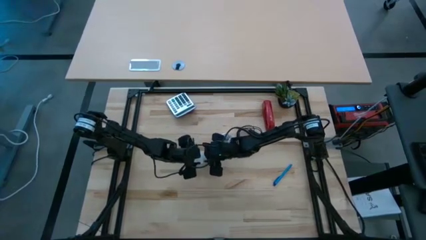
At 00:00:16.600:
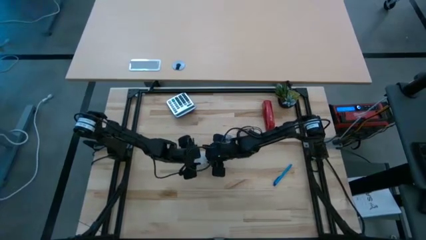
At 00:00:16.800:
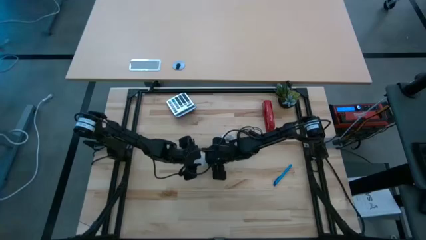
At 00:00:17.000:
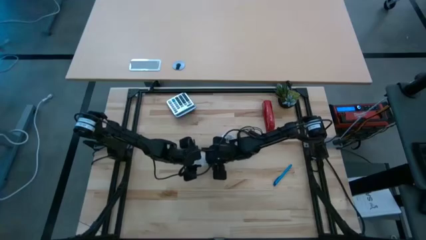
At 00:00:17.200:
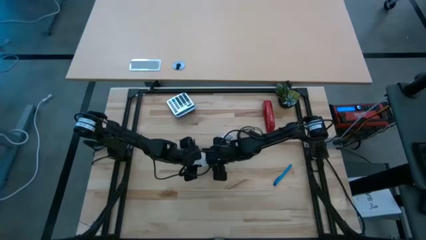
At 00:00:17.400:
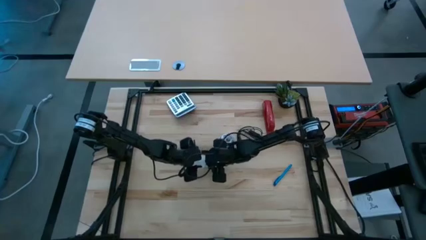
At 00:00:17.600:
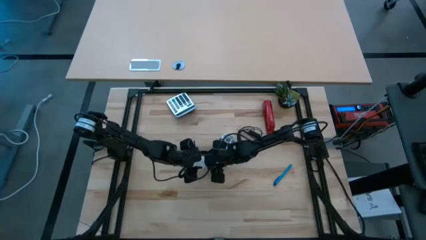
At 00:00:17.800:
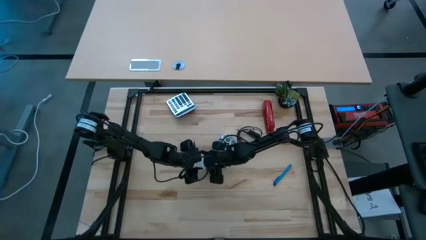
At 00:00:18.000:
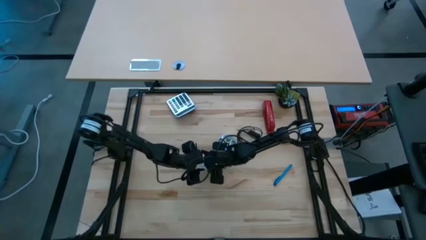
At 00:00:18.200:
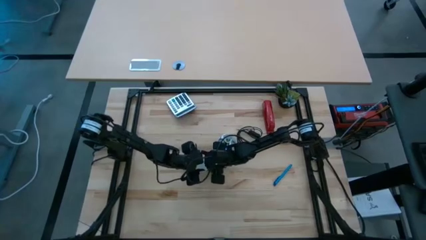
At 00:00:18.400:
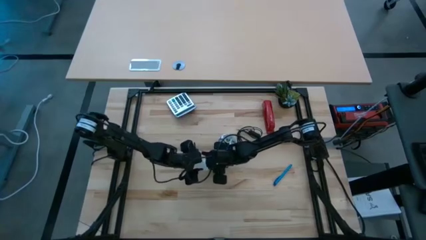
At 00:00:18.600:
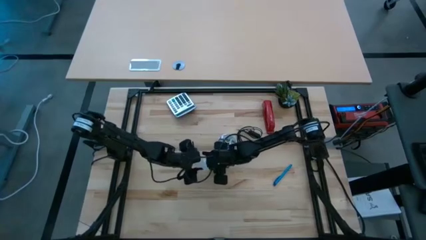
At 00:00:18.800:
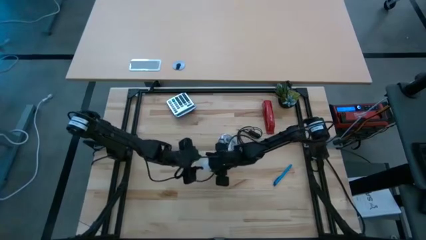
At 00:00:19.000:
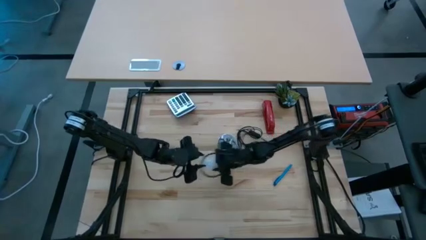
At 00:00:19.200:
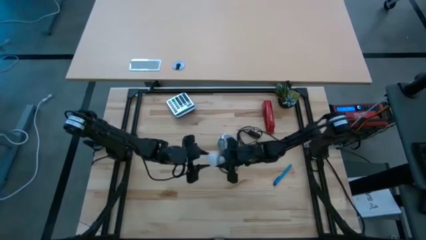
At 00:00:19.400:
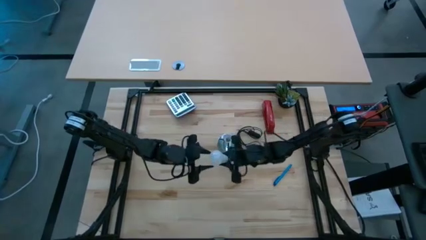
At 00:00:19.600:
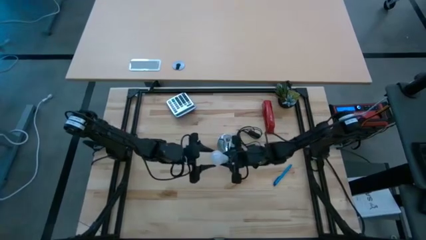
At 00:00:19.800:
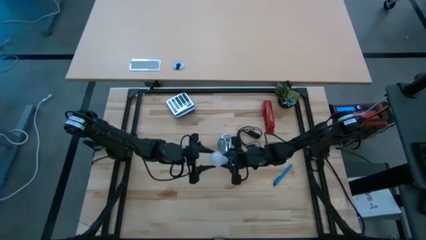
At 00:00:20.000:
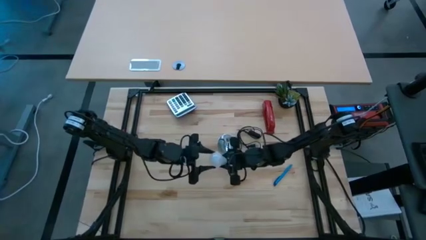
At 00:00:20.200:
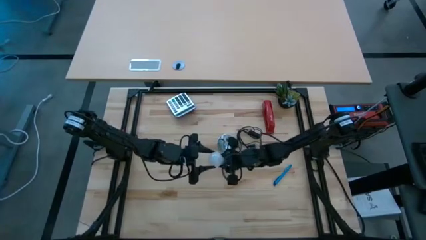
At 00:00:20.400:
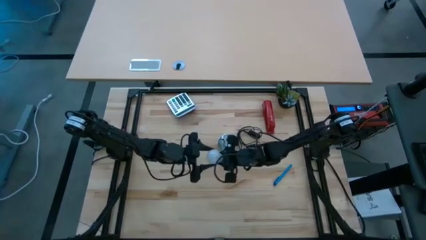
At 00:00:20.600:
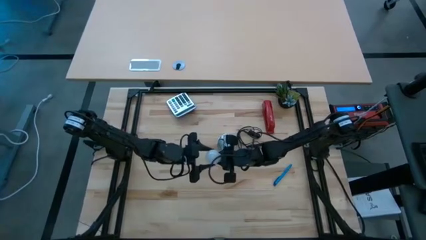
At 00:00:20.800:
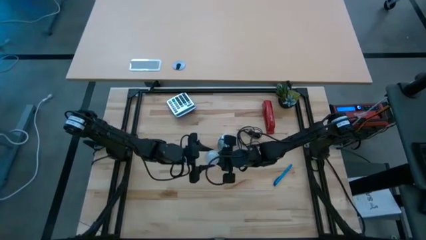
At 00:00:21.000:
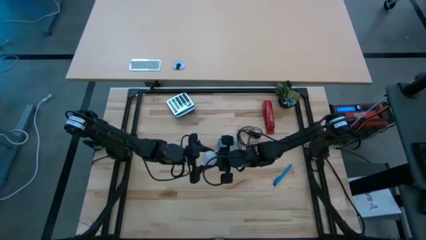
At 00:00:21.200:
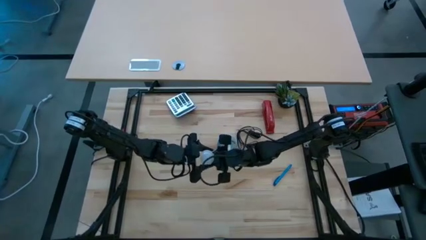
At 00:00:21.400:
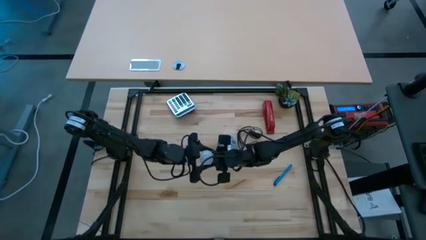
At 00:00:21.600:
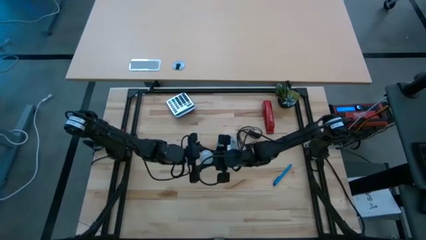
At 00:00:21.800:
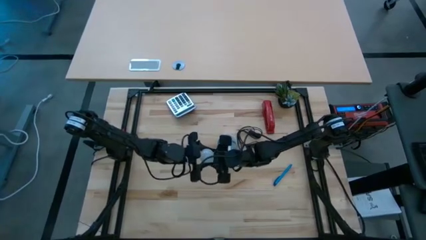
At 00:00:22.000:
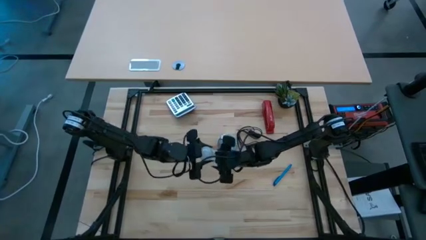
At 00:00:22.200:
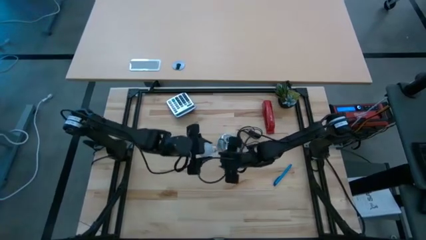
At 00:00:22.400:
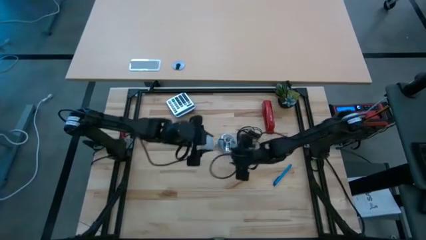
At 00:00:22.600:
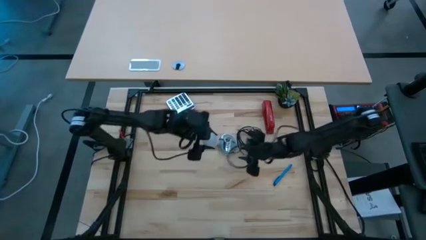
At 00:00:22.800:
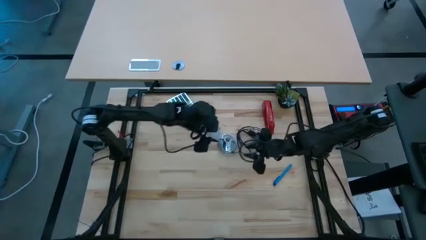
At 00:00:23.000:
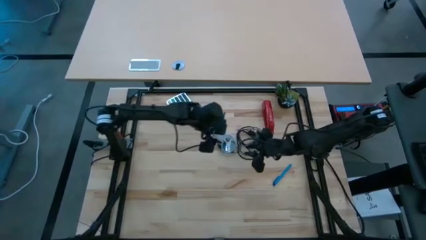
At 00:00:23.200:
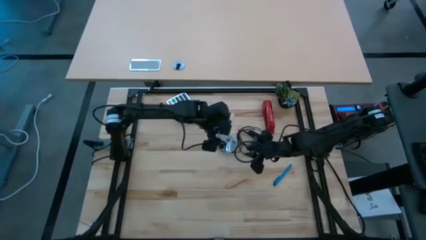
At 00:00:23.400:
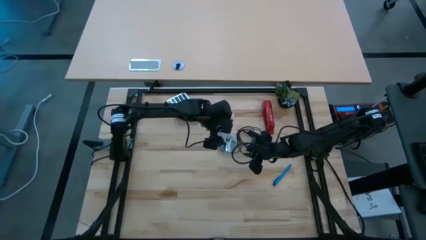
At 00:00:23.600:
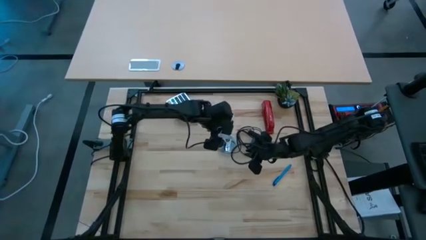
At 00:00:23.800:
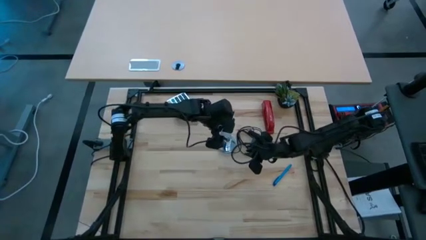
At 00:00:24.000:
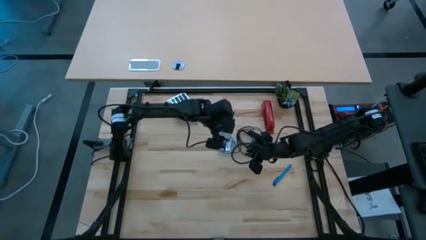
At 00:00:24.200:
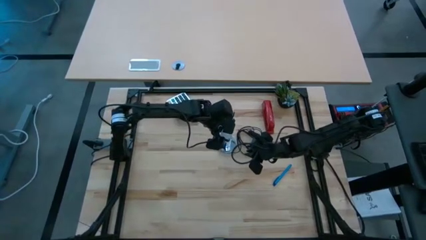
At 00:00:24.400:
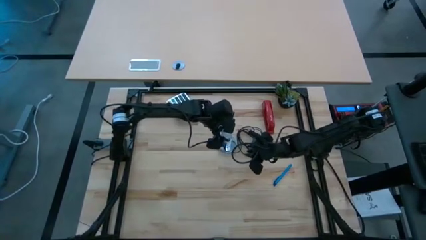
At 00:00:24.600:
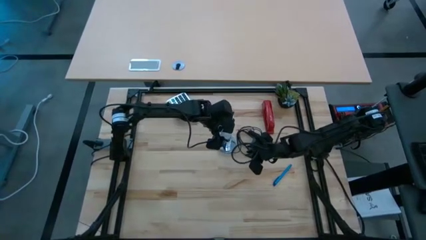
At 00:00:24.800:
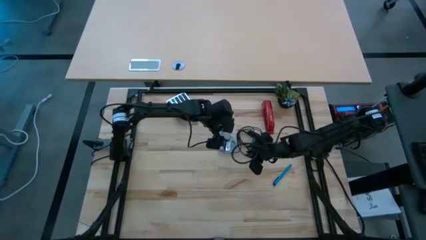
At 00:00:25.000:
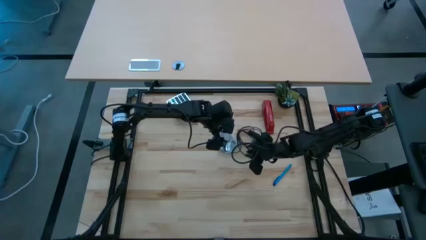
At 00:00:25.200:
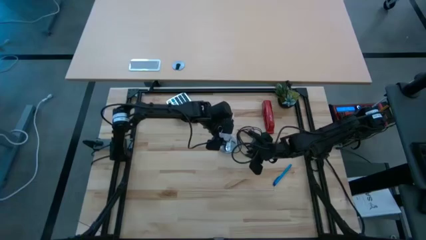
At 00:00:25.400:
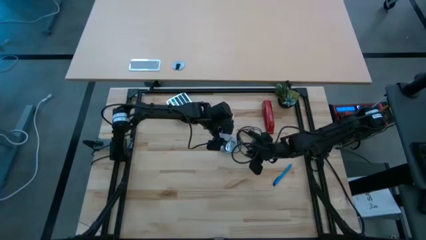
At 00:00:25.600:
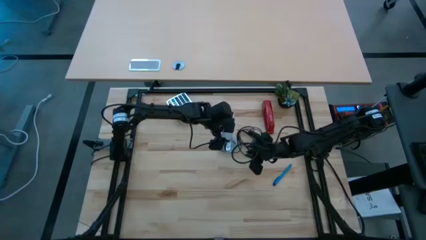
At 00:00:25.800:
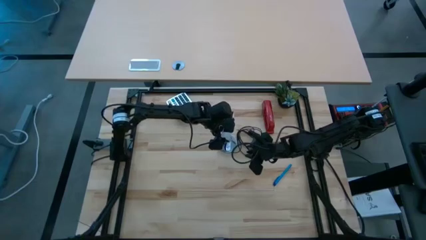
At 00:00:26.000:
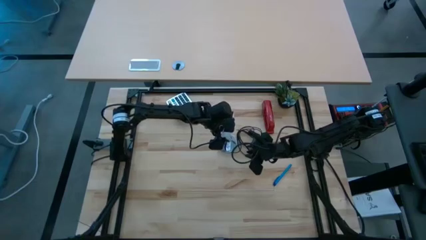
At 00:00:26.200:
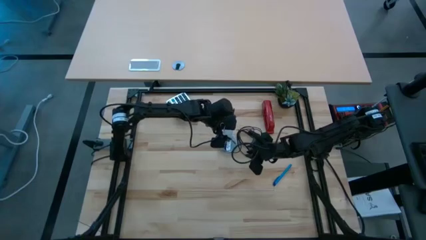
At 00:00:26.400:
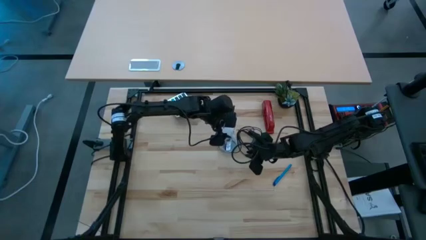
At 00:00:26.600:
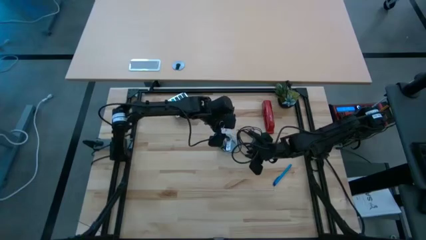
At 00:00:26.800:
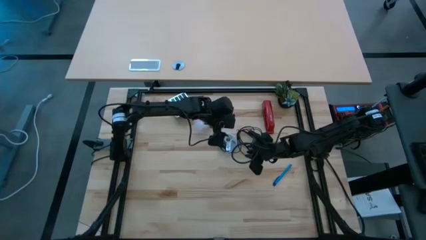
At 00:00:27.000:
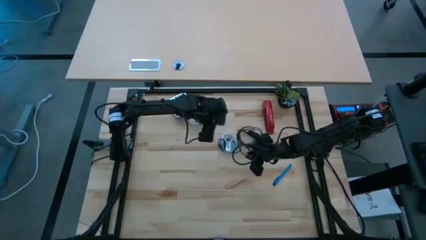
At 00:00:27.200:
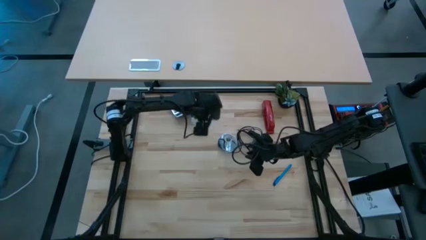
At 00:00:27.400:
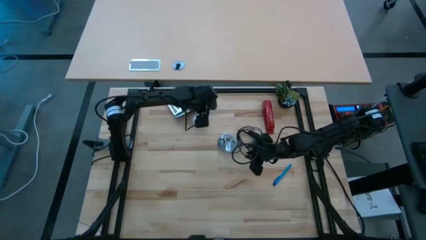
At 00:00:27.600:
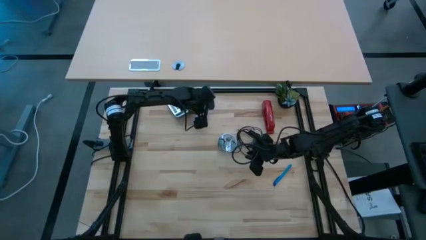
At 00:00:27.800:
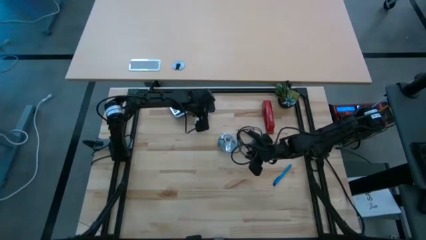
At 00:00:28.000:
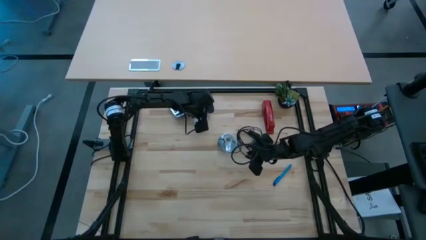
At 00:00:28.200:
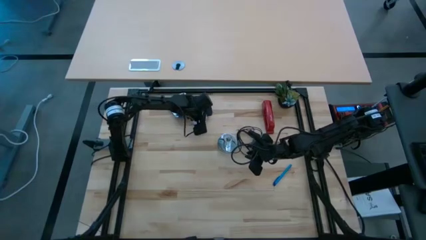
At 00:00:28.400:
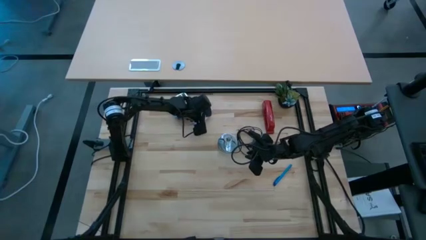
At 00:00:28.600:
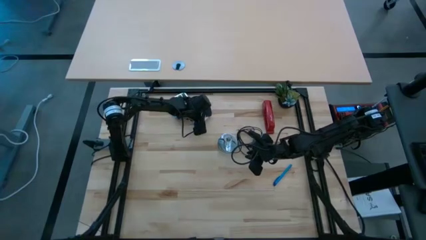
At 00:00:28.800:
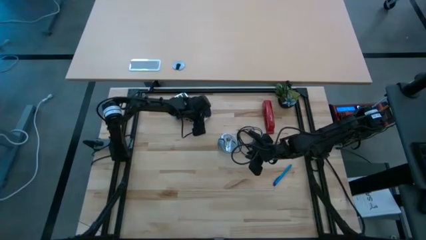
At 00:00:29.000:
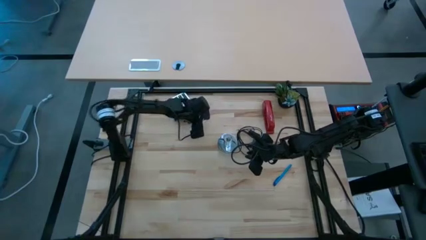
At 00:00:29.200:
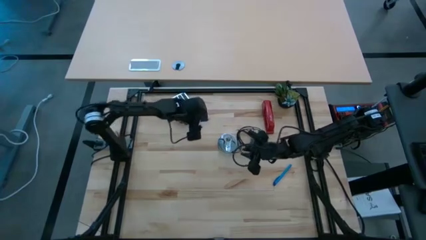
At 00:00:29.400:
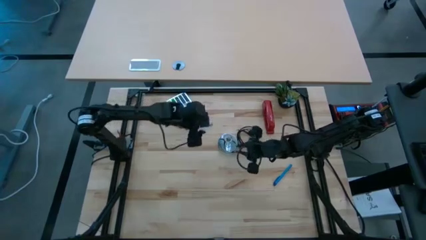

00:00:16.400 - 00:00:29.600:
Task: Screw lightbulb
Insert the white lightbulb into the silver lamp
